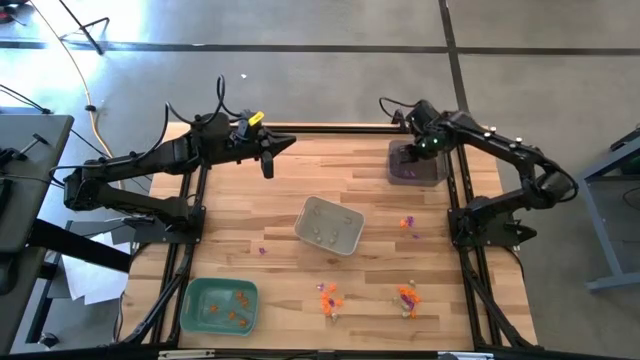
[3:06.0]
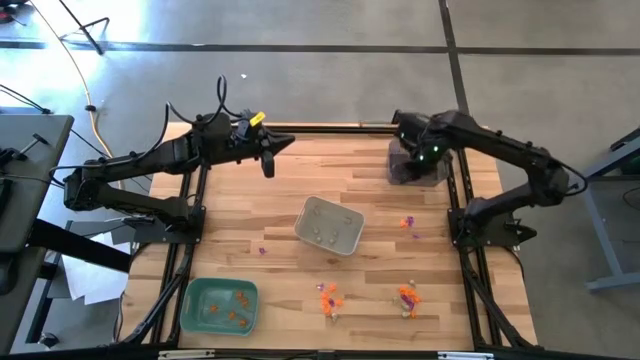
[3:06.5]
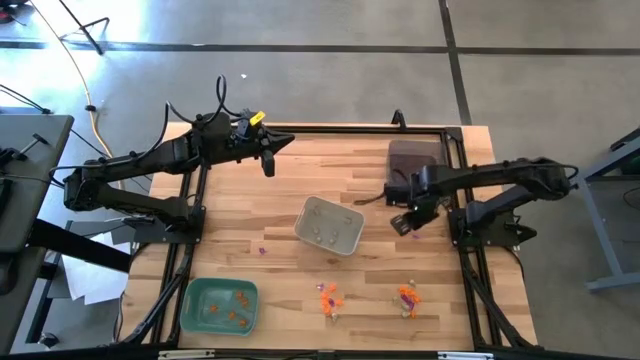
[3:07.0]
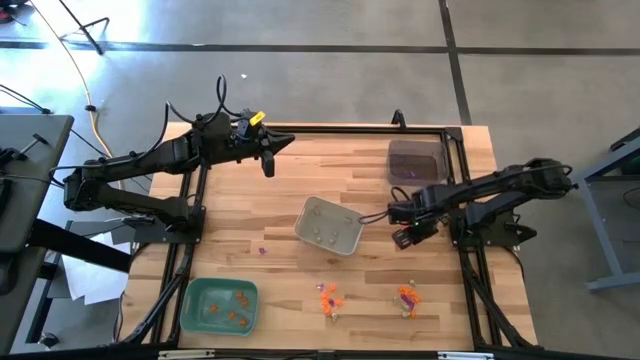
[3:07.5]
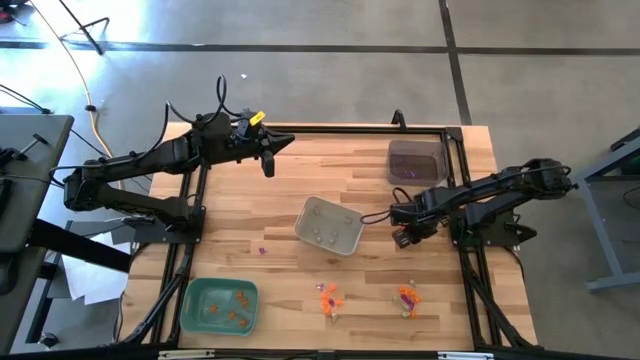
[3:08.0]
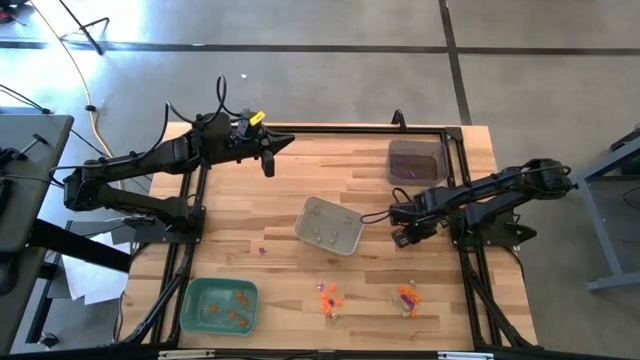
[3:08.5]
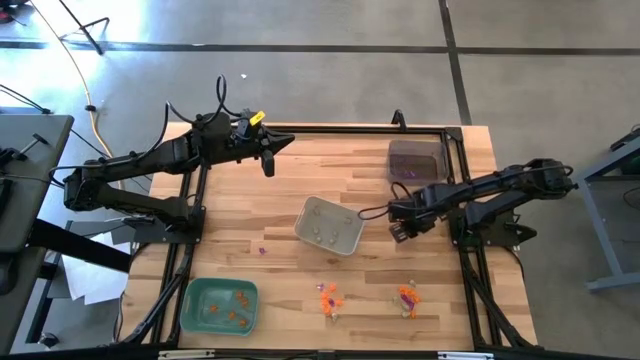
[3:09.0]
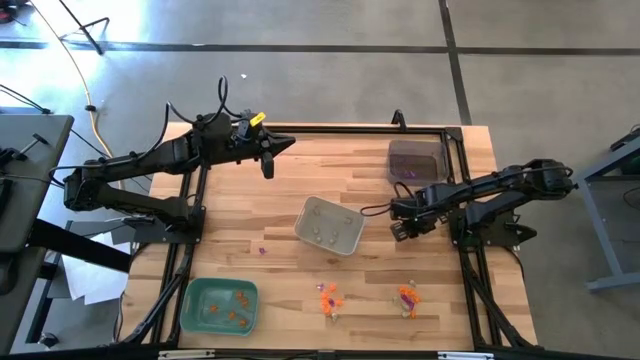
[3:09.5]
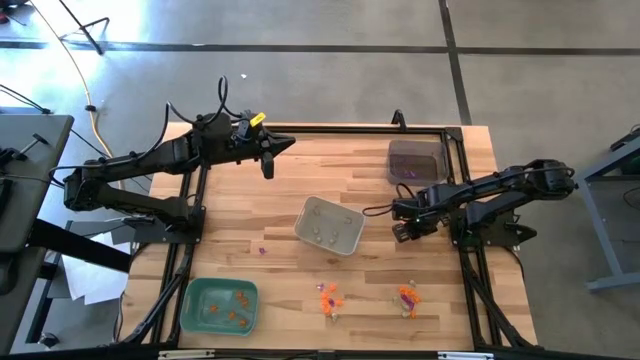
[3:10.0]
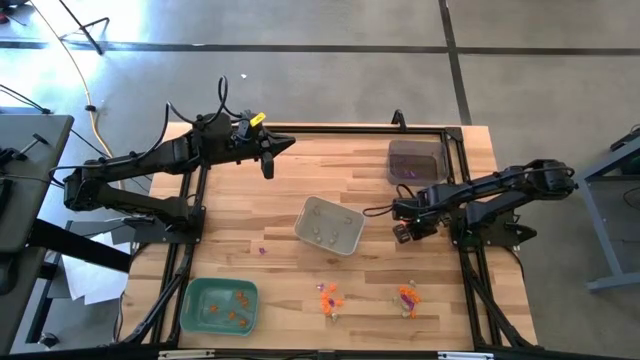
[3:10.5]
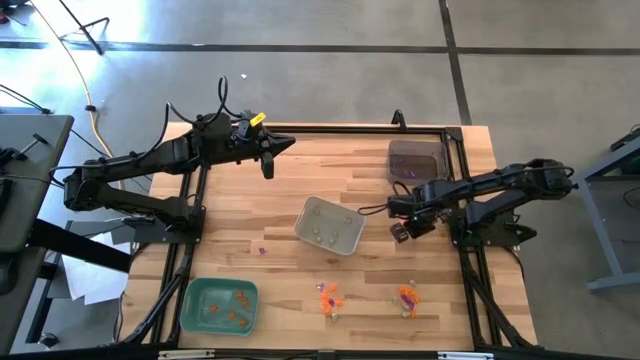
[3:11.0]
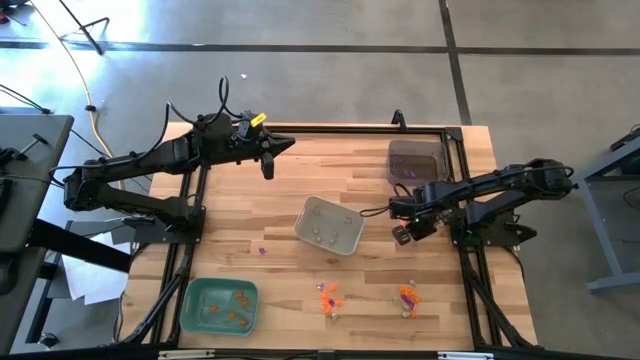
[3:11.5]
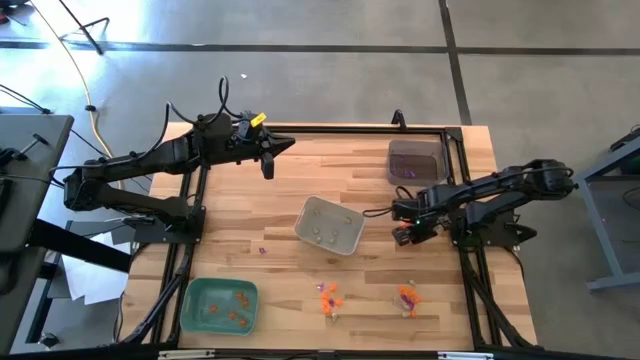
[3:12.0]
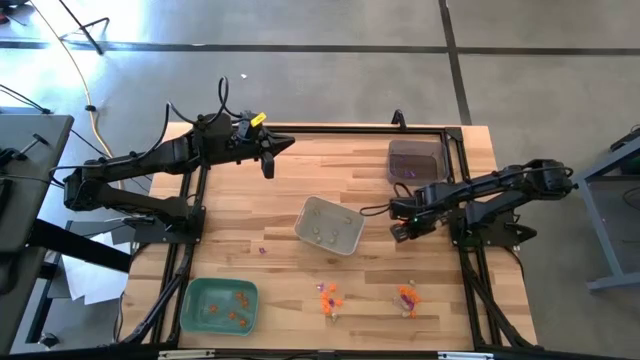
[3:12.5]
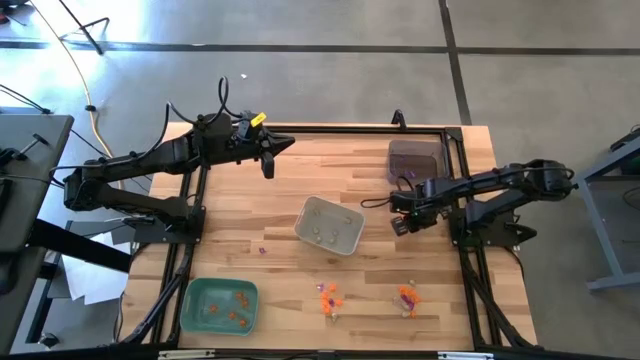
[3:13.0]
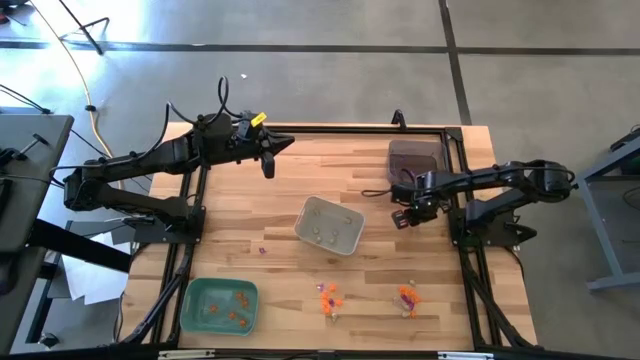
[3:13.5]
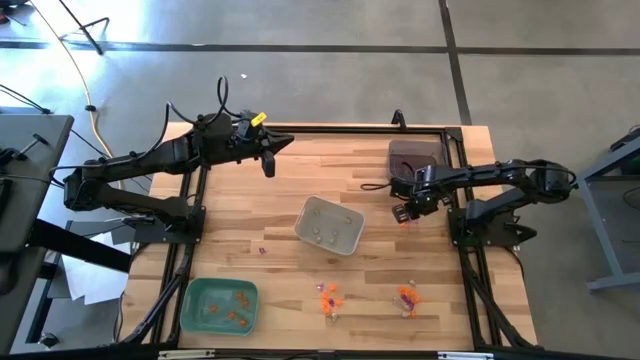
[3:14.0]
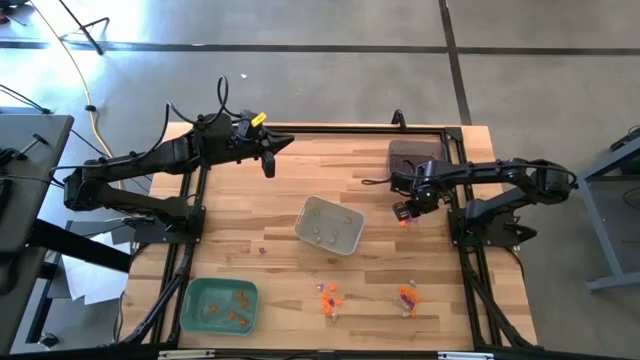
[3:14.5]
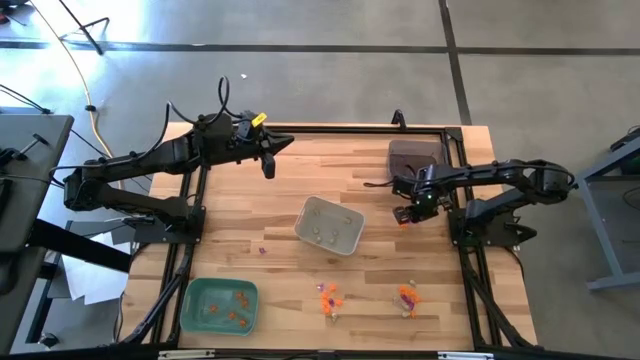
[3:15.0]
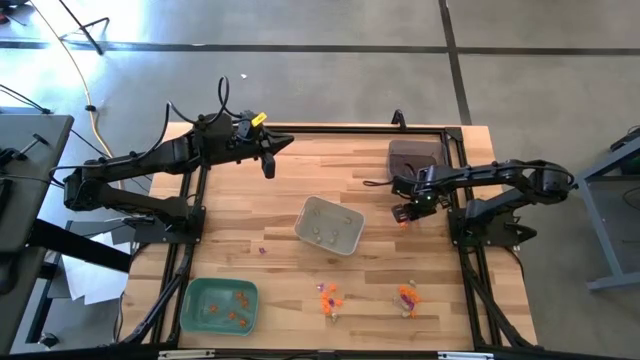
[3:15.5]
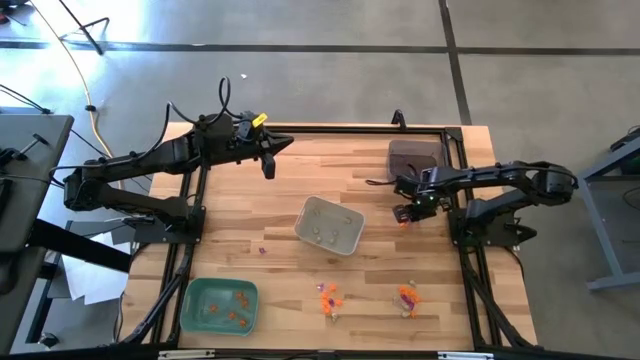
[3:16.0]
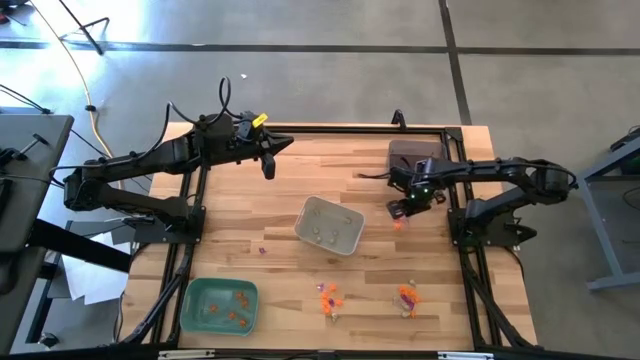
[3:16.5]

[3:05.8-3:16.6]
Task: Sort Halloween decoration
Put the violet witch hat toy into the black bin

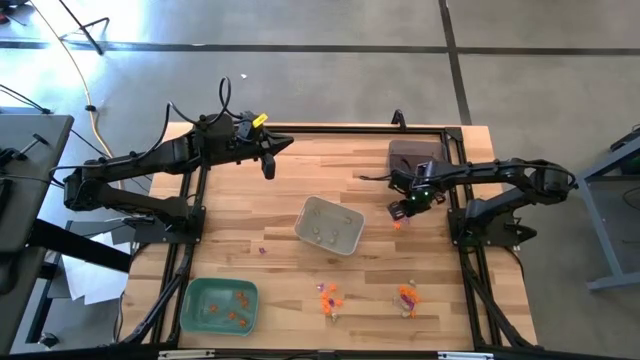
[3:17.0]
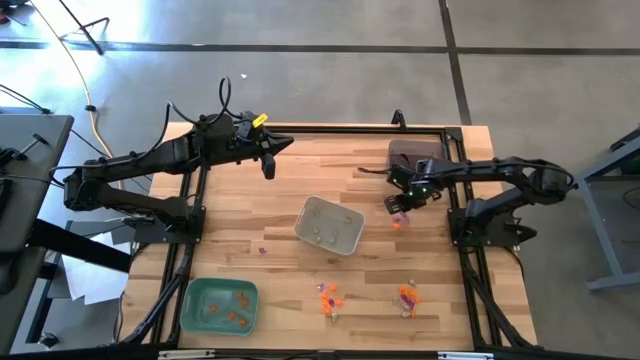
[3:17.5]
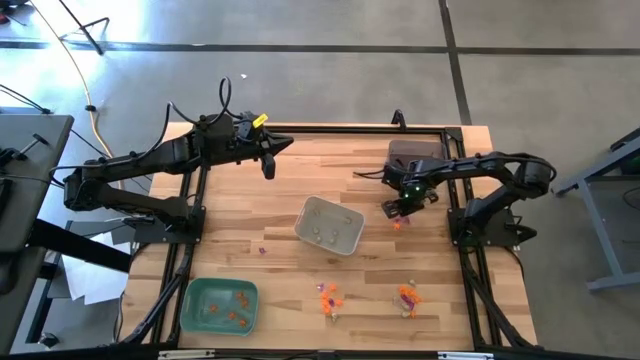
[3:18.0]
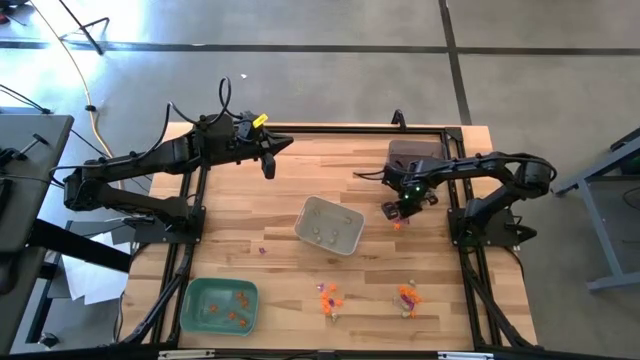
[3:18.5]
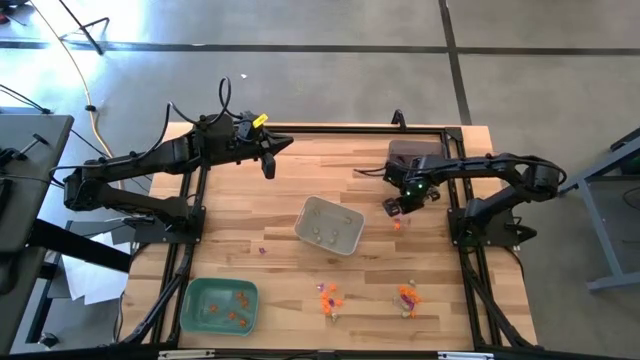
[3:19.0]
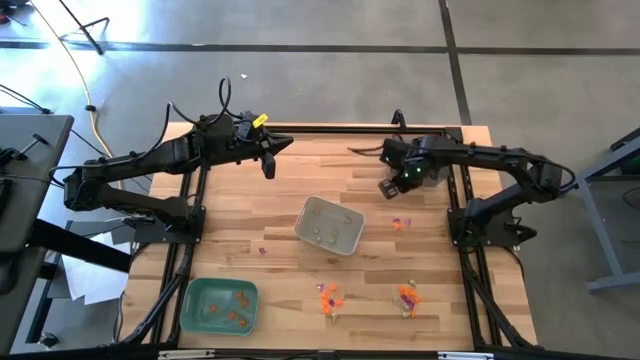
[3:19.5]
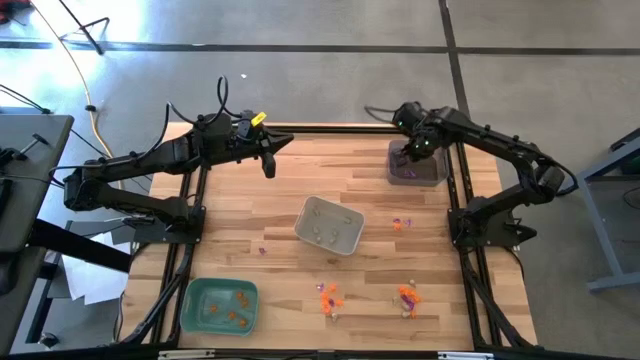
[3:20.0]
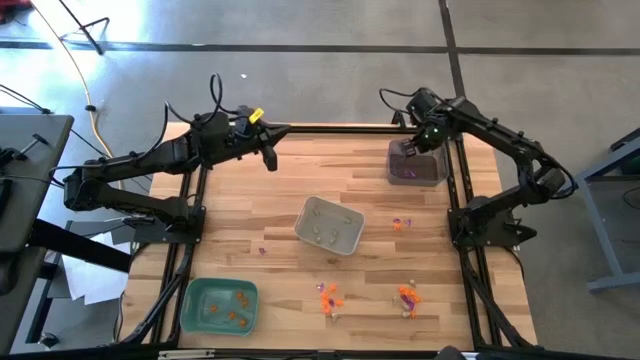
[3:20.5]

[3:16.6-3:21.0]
Put the violet witch hat toy into the black bin

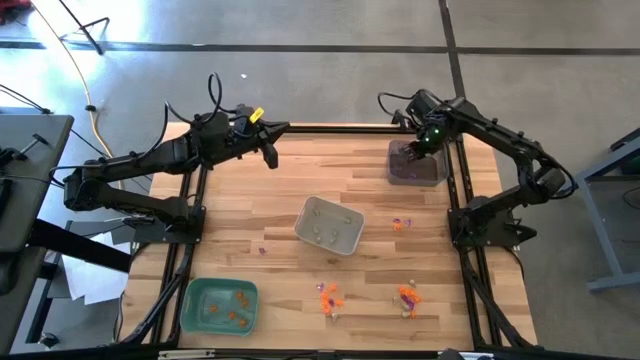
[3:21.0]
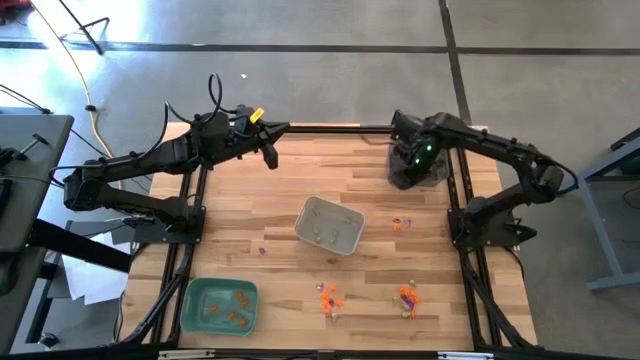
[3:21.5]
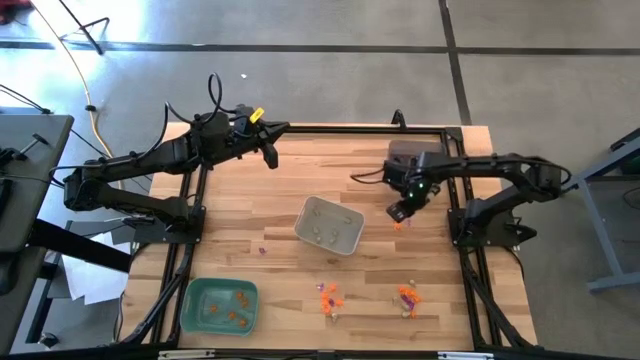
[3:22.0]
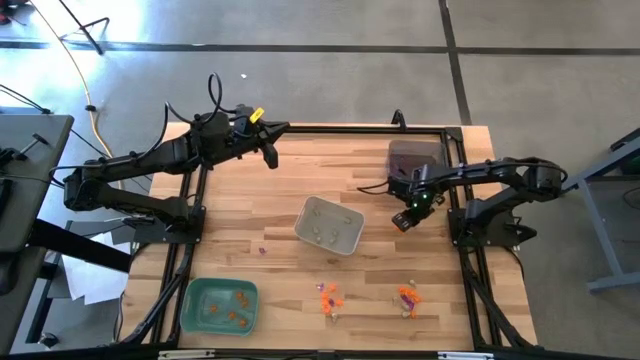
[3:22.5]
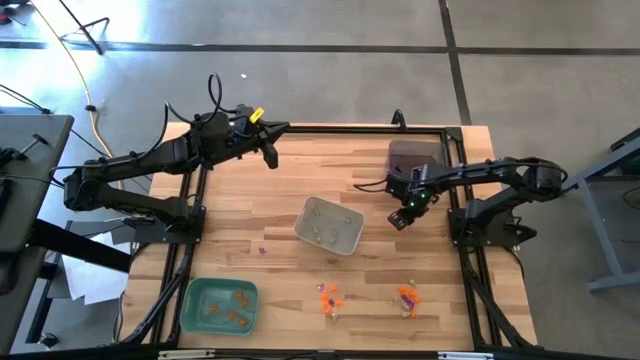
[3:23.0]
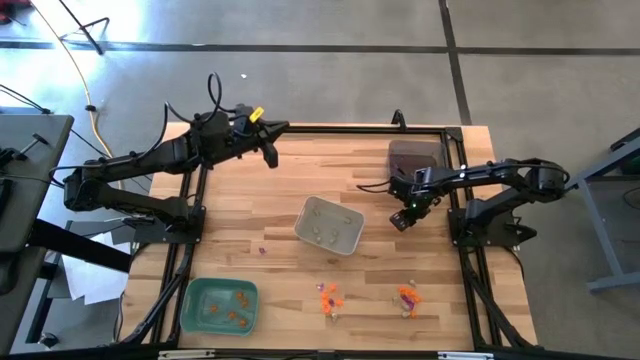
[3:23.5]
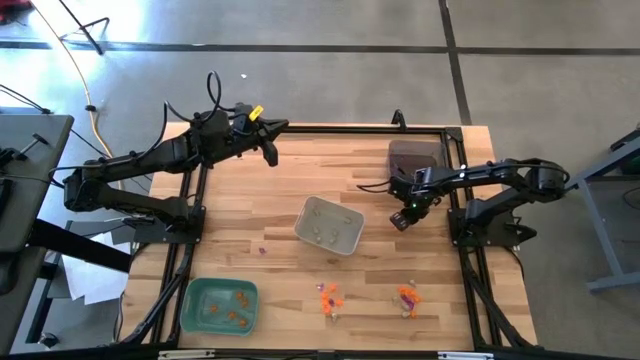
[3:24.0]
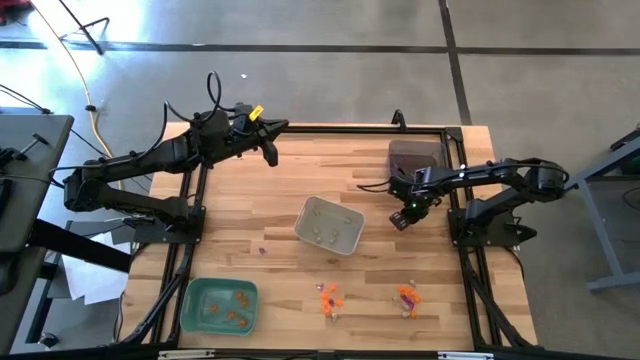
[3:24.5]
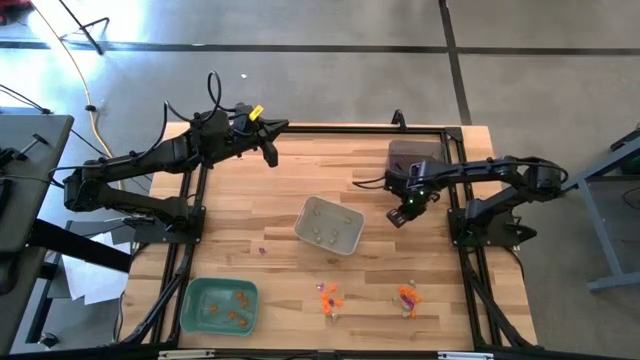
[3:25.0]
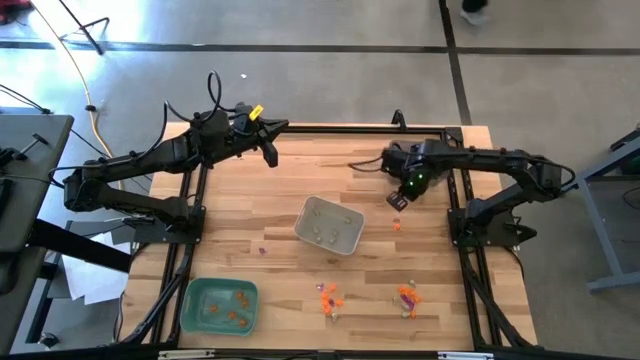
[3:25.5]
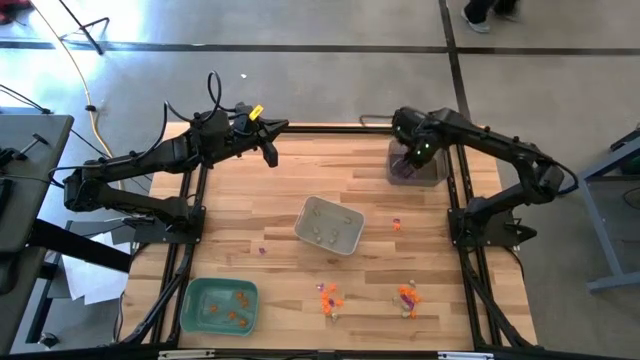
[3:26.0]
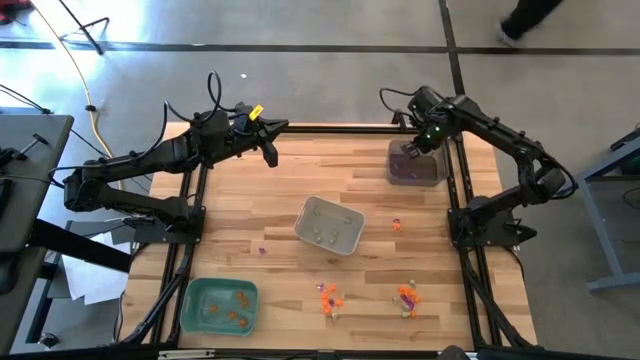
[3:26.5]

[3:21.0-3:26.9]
Put the violet witch hat toy into the black bin
